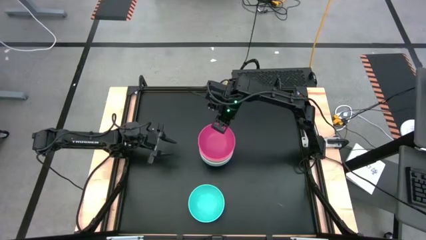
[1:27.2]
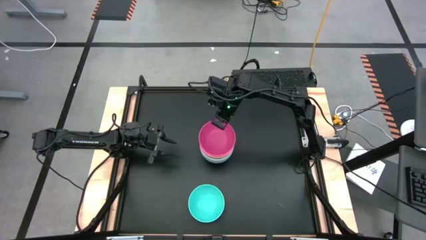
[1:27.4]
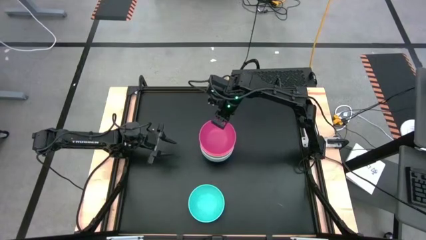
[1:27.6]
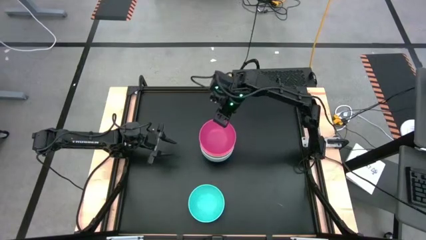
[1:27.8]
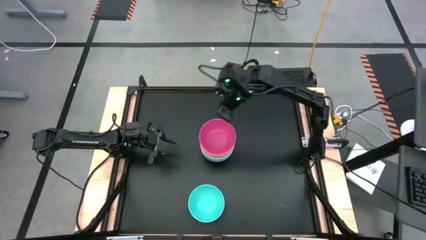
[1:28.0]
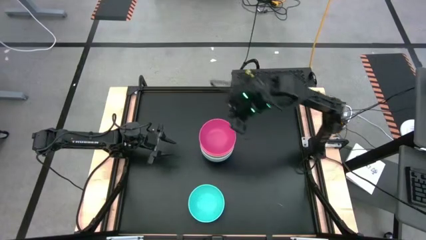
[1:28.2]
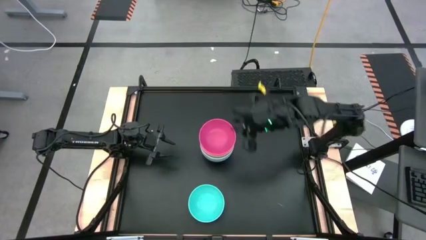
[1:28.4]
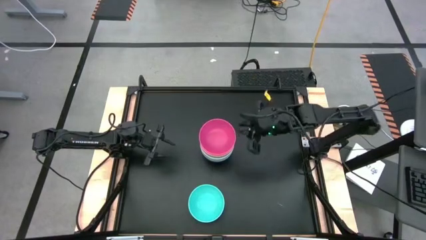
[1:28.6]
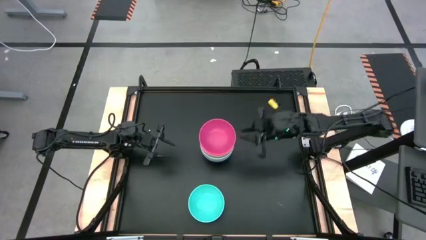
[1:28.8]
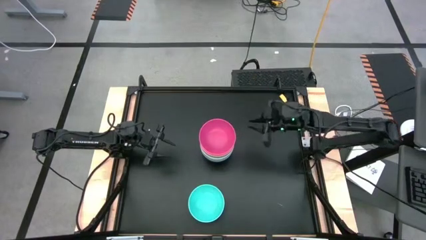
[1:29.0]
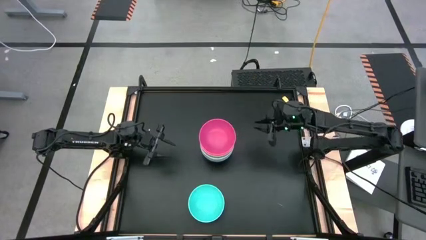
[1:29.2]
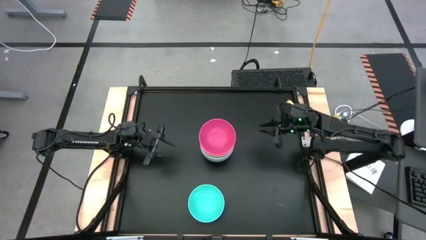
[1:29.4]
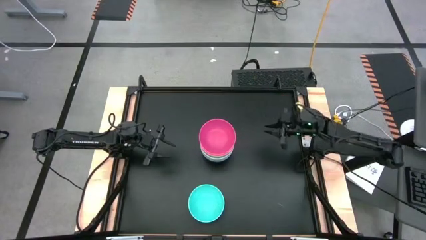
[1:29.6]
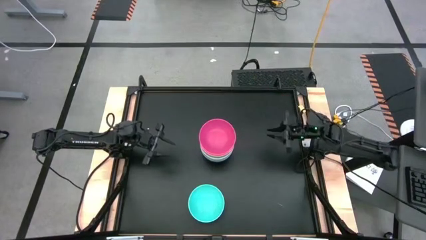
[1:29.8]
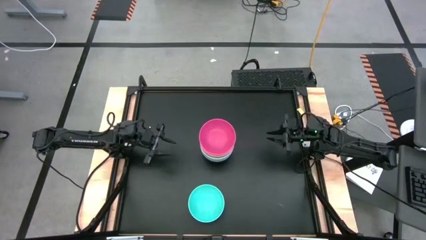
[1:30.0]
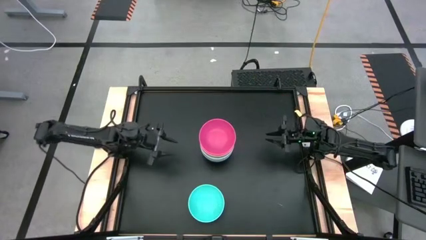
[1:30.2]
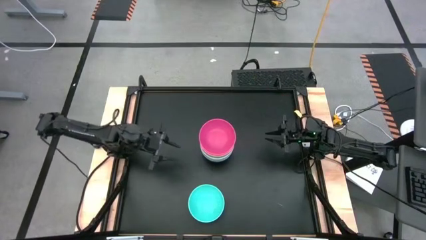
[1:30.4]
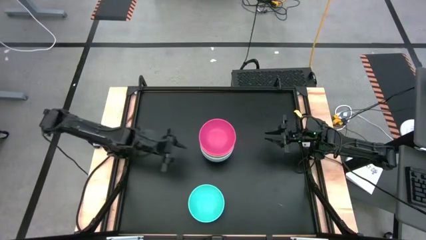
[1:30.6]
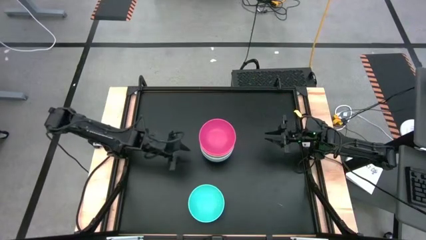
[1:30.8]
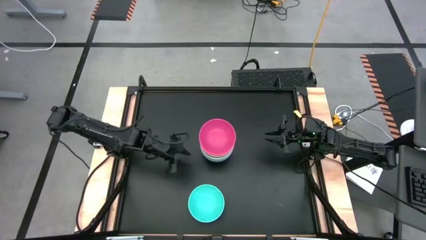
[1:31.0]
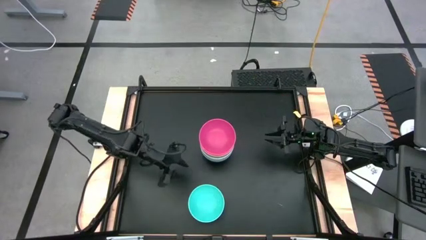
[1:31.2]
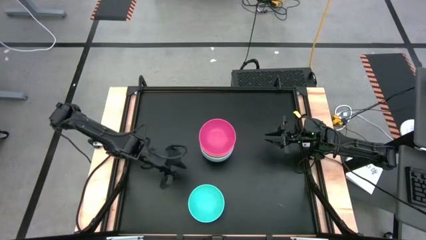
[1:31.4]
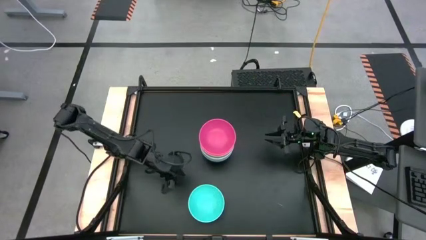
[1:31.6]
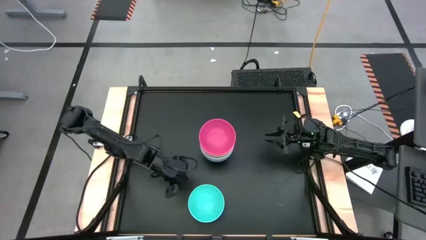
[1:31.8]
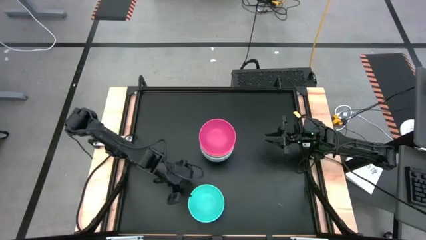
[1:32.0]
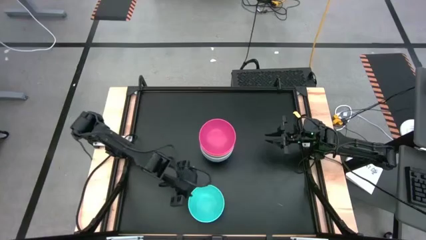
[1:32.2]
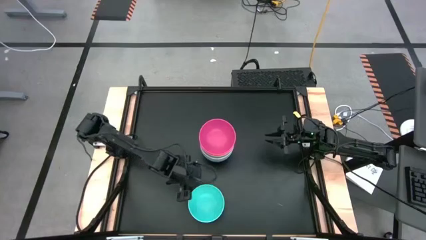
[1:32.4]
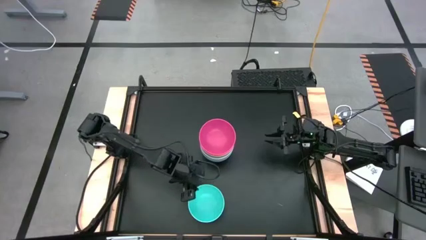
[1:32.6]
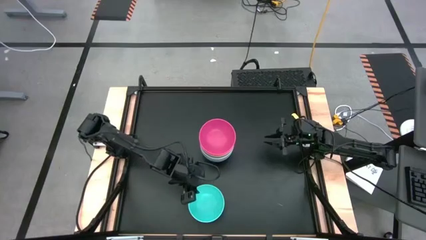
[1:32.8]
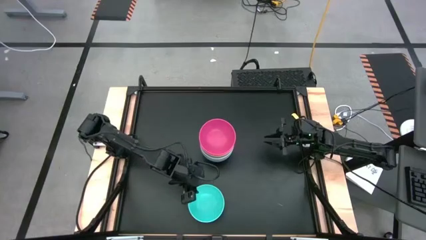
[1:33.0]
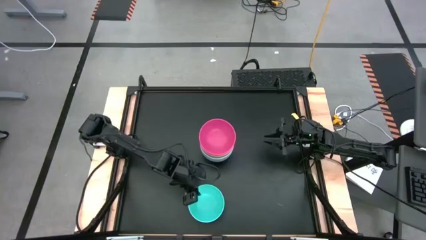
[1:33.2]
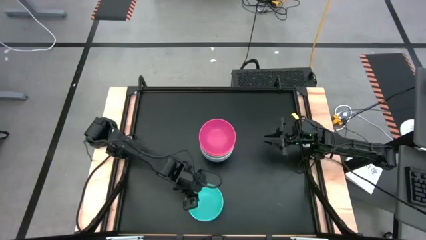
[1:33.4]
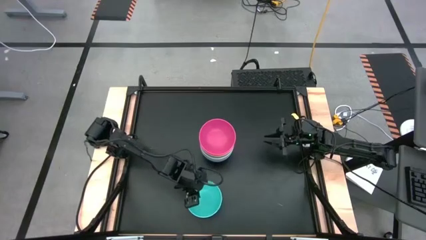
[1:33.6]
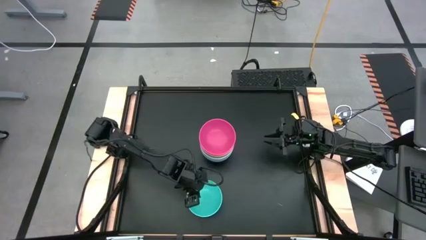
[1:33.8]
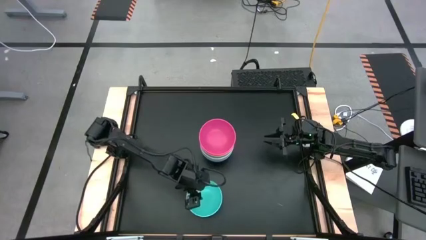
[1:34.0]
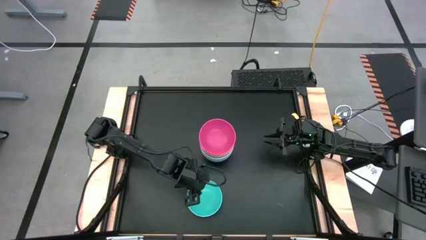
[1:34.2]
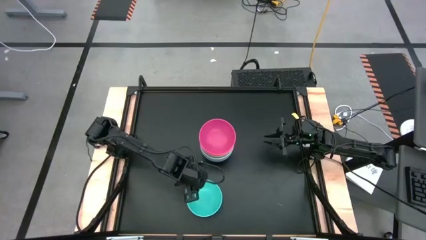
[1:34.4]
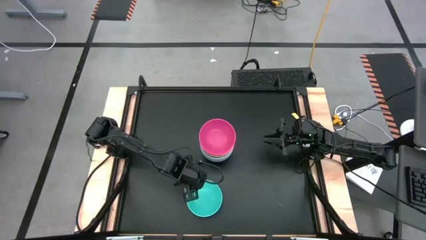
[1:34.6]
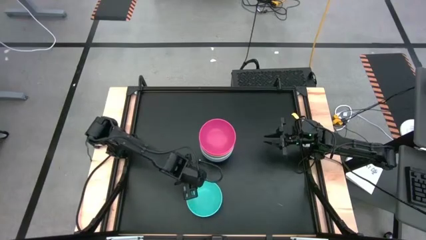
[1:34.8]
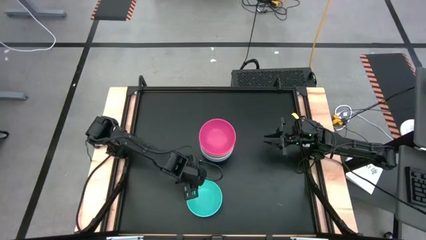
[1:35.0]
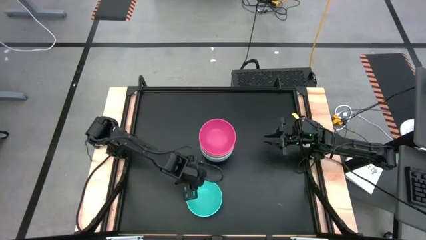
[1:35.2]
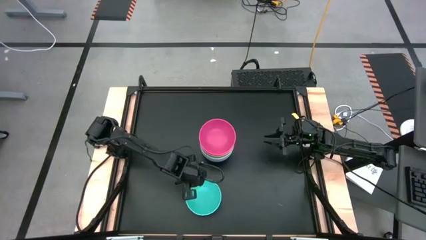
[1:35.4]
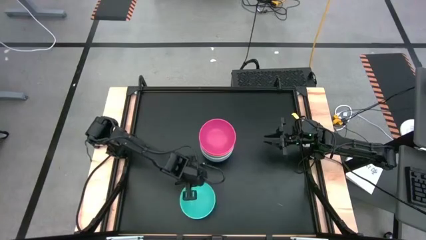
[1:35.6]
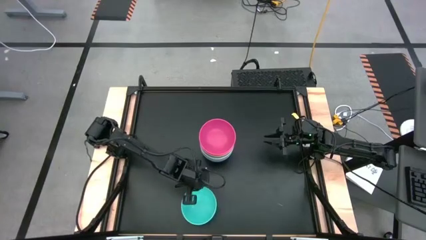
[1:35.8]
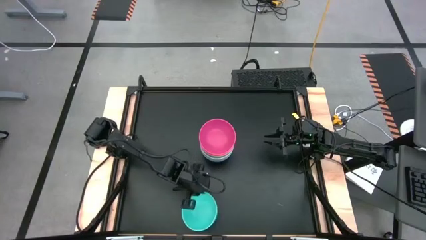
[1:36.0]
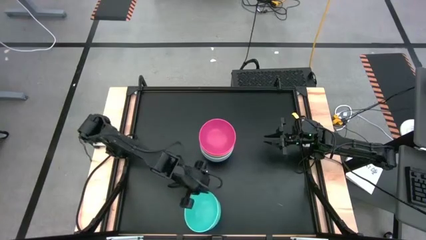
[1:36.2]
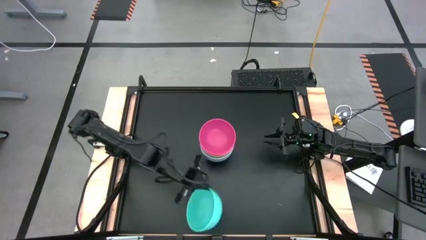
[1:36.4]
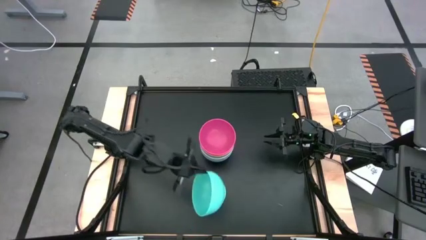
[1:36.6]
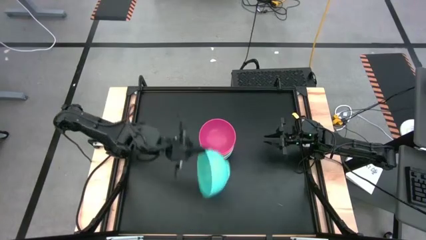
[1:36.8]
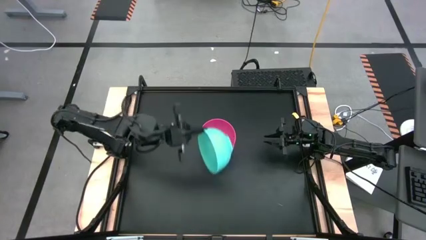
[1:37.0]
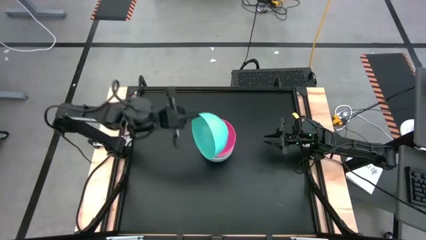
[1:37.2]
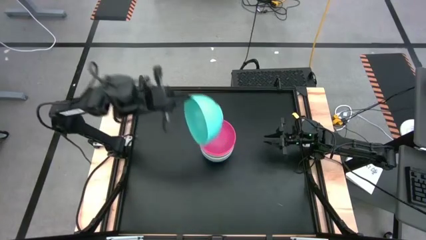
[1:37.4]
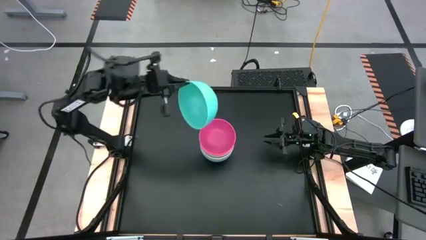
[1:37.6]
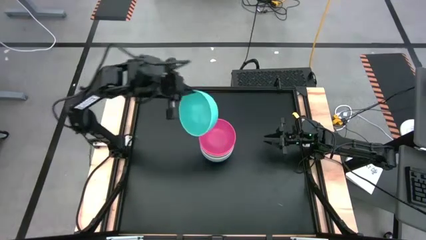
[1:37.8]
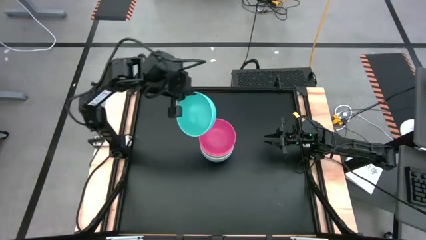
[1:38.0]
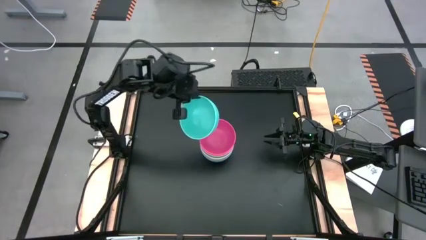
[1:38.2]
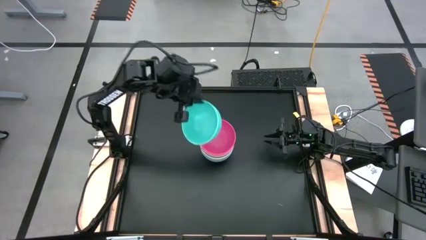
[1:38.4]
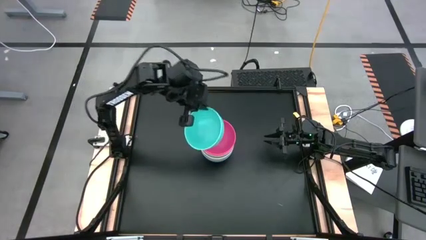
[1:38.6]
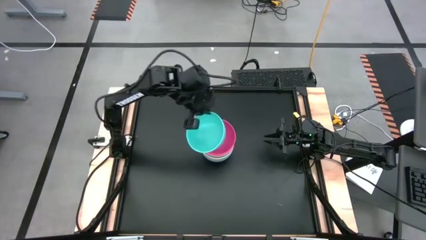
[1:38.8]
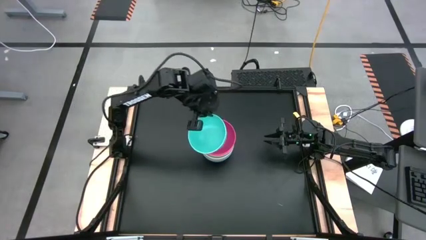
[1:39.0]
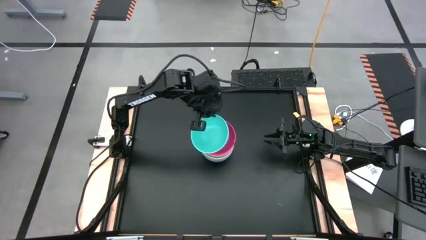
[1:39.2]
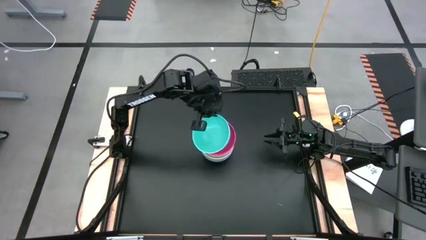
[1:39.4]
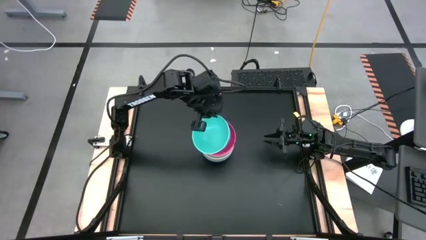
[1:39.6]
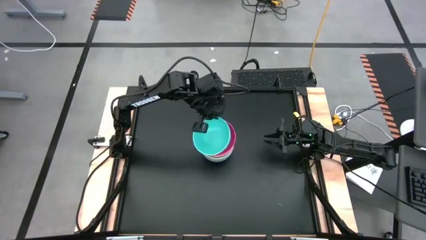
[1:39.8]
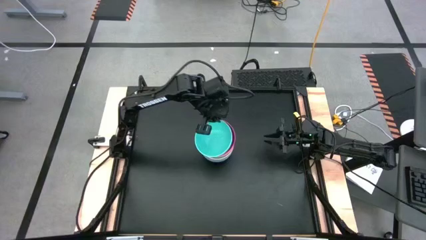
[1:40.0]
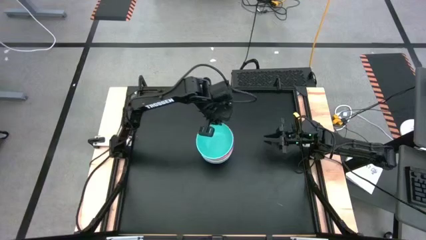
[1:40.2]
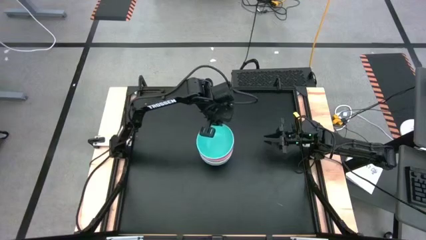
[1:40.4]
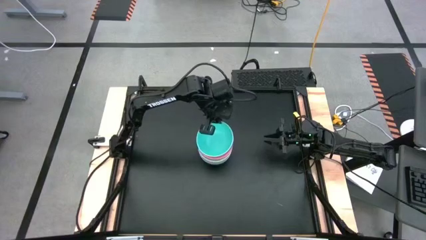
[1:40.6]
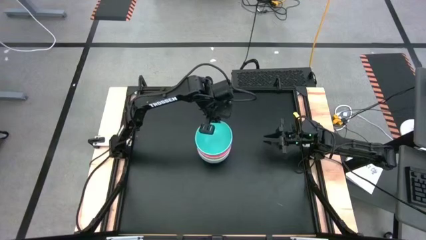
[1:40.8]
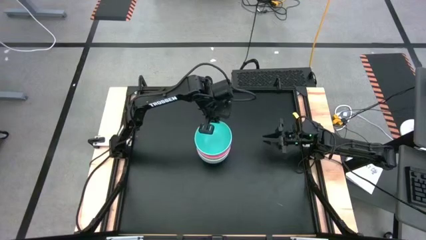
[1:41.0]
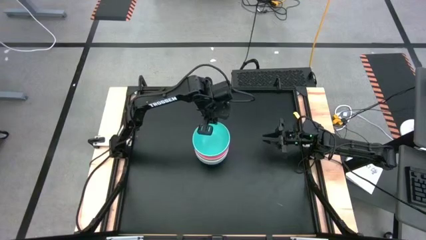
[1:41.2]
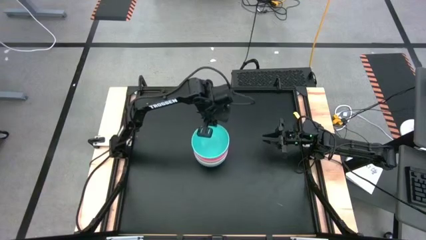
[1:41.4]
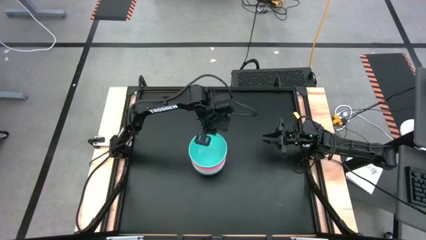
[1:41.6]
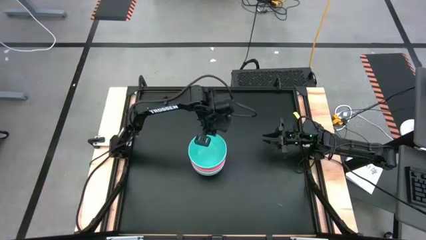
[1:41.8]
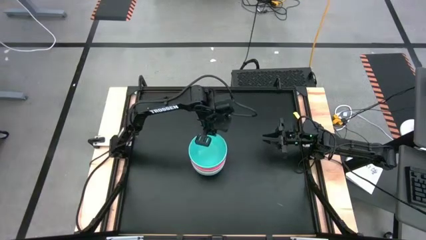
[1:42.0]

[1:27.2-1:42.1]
Task: Nest bowls inside each other
Stack the light blue bowl on the pink bowl

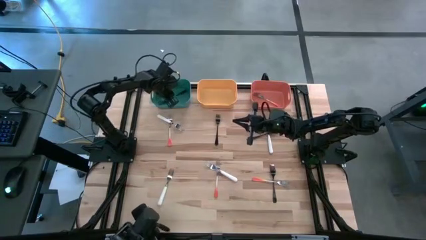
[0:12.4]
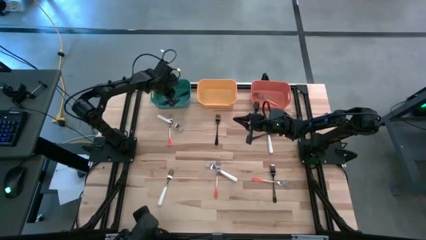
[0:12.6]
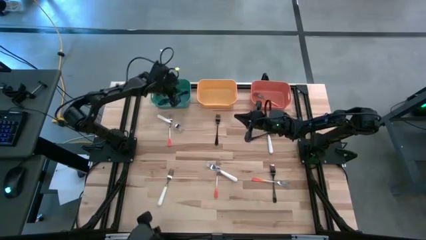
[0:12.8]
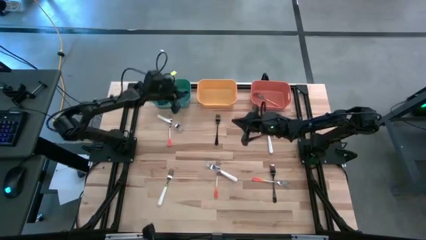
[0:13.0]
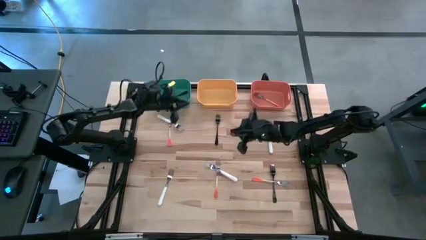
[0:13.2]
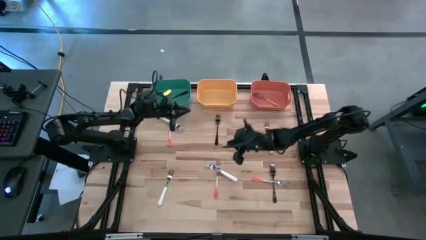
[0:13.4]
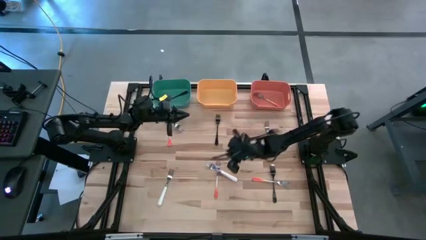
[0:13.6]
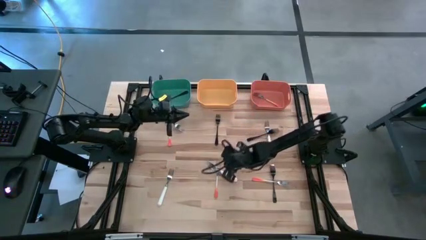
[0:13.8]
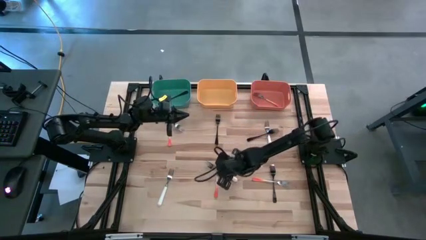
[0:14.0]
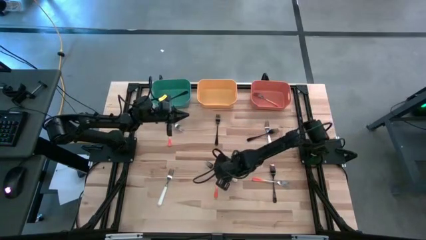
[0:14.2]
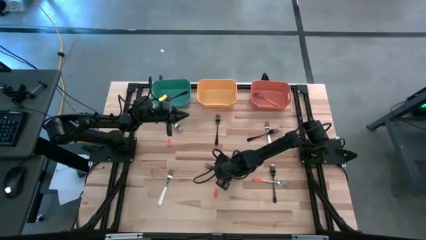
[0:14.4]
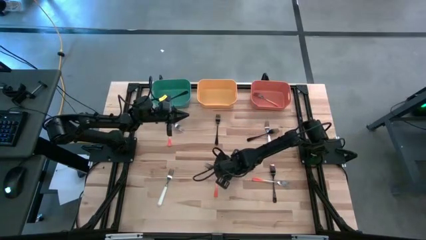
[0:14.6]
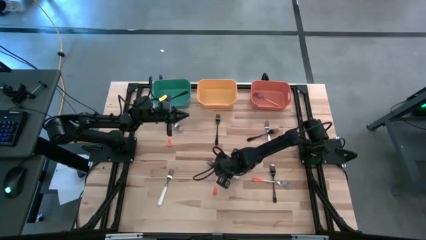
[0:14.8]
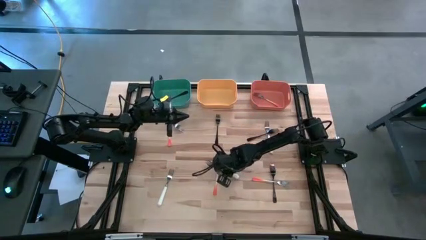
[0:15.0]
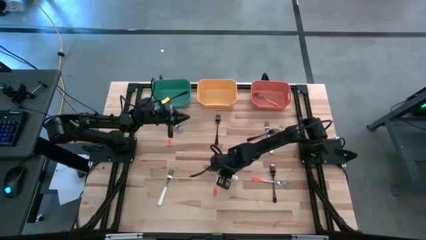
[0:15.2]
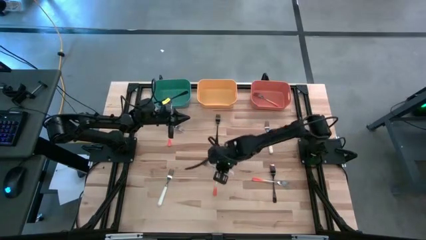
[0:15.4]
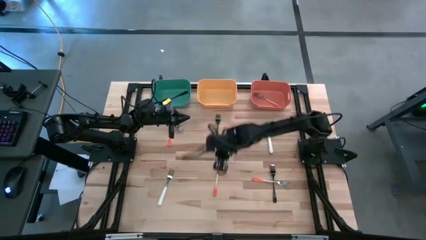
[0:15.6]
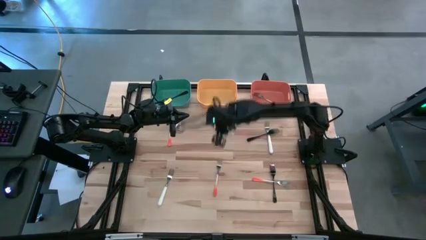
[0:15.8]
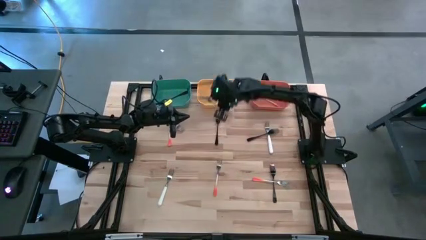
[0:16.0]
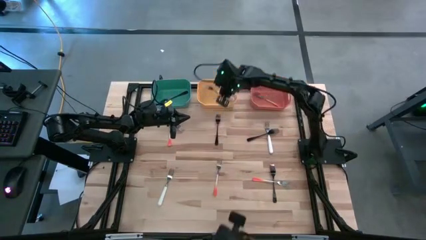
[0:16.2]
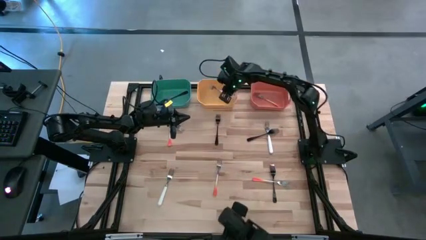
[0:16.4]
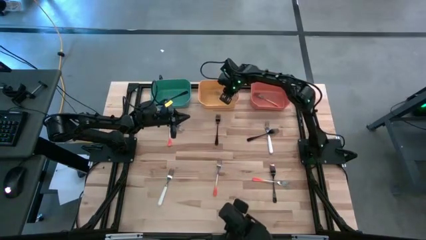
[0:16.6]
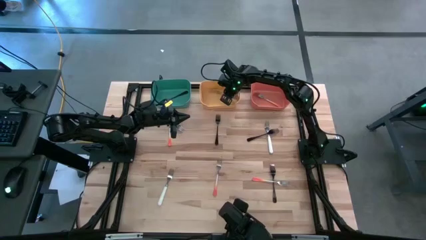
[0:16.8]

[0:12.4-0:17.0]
Task: Sort silverware by color (type)
Put the white fork into the yellow bin
